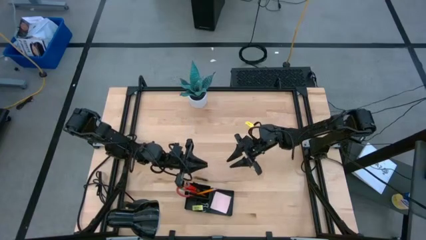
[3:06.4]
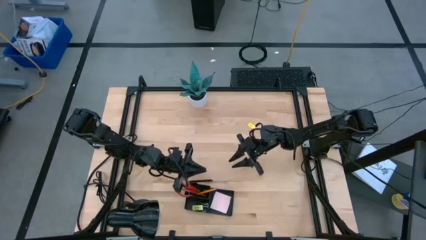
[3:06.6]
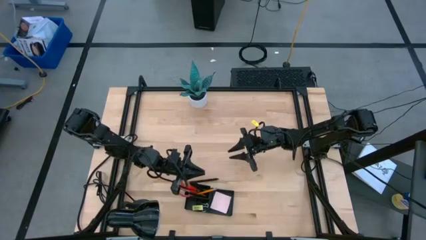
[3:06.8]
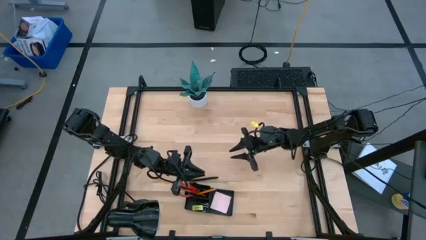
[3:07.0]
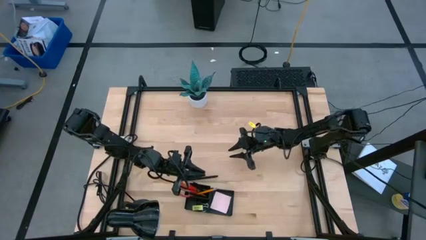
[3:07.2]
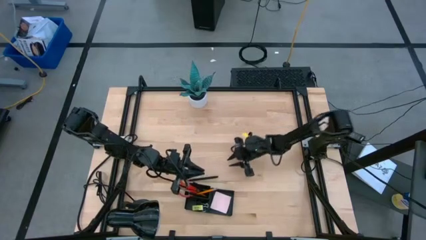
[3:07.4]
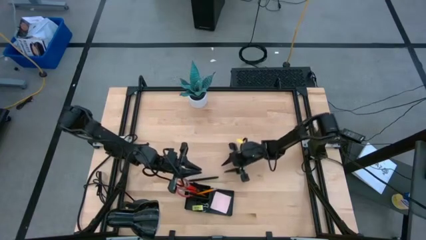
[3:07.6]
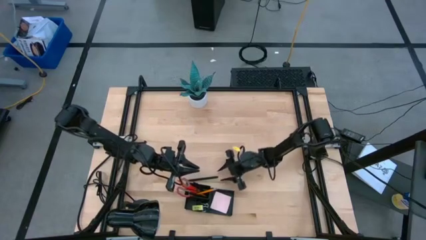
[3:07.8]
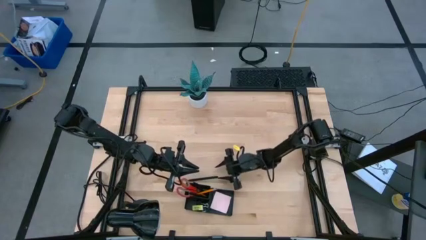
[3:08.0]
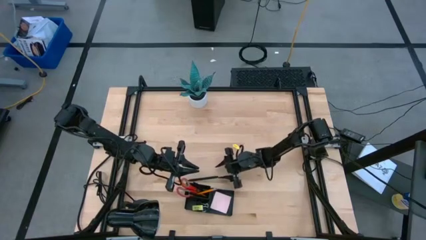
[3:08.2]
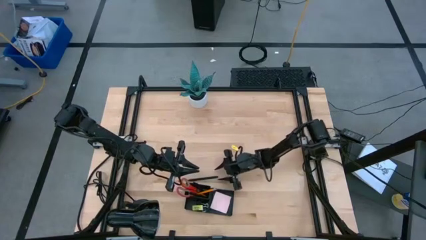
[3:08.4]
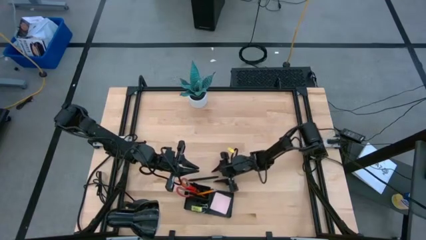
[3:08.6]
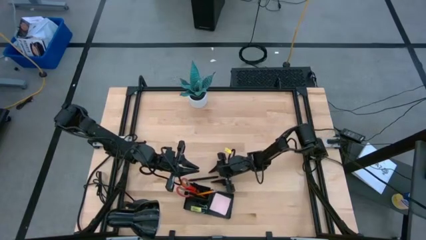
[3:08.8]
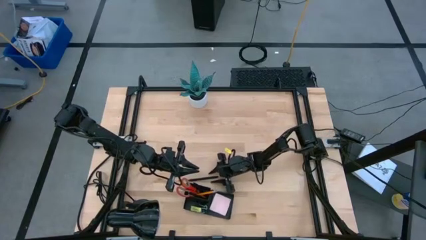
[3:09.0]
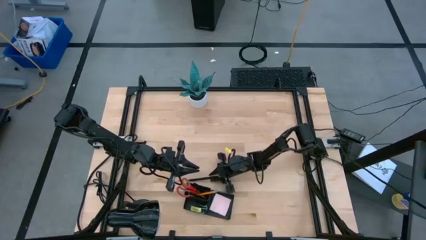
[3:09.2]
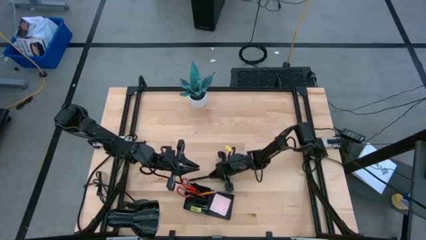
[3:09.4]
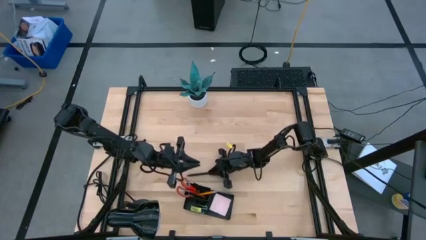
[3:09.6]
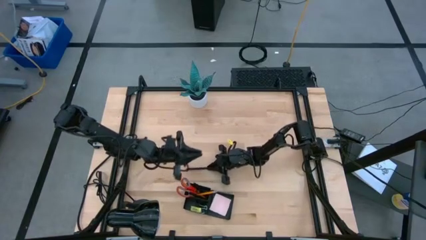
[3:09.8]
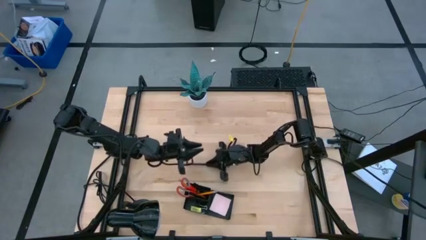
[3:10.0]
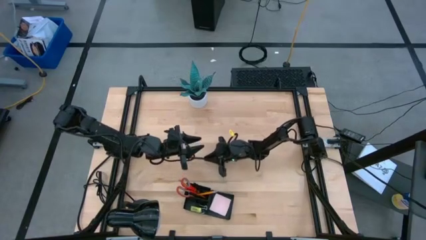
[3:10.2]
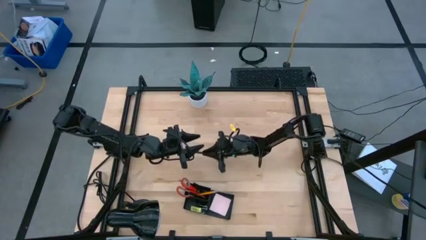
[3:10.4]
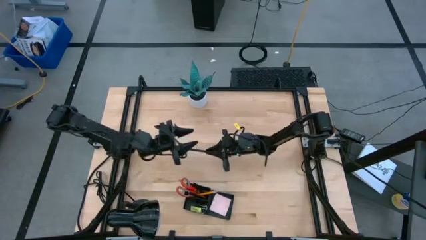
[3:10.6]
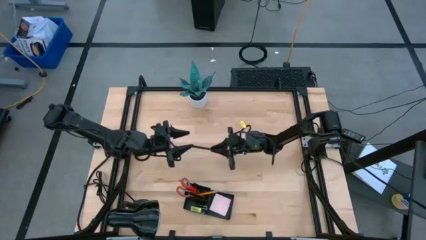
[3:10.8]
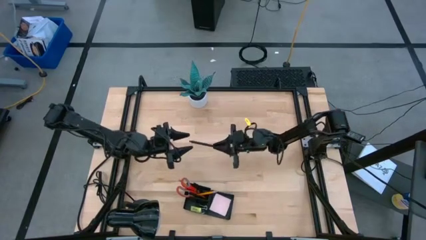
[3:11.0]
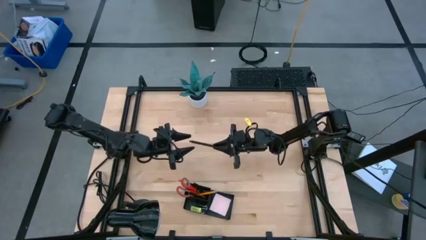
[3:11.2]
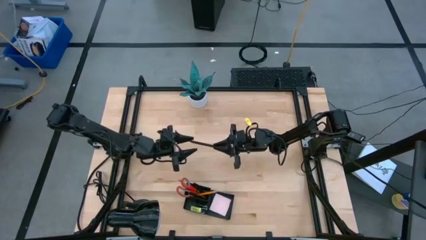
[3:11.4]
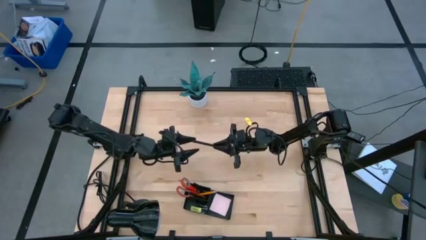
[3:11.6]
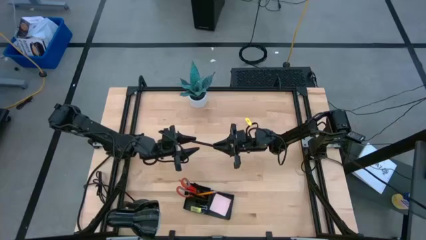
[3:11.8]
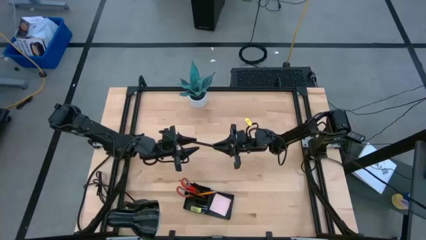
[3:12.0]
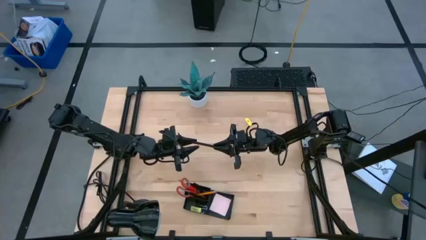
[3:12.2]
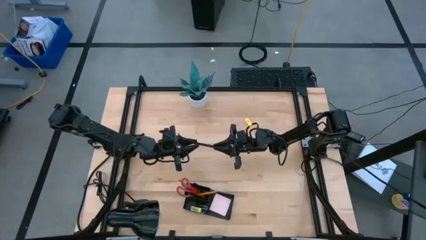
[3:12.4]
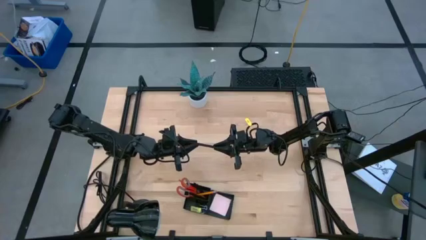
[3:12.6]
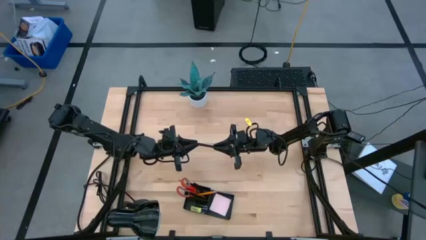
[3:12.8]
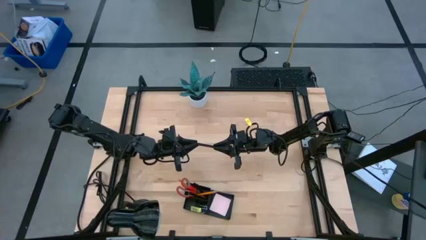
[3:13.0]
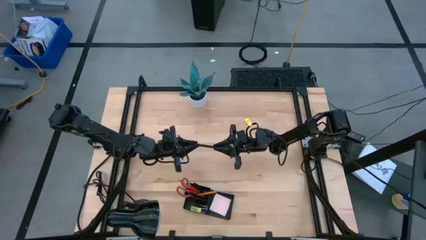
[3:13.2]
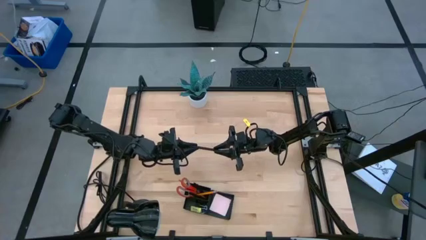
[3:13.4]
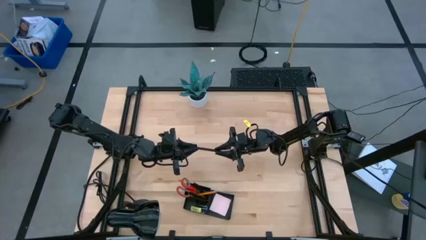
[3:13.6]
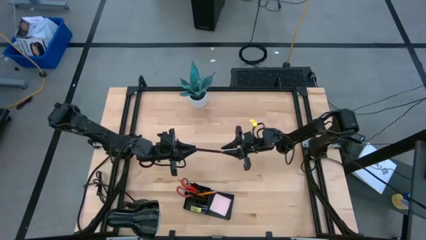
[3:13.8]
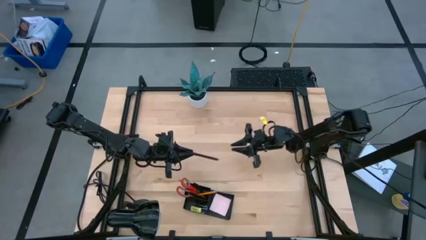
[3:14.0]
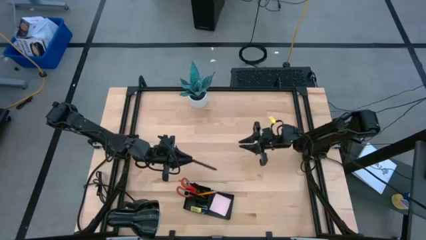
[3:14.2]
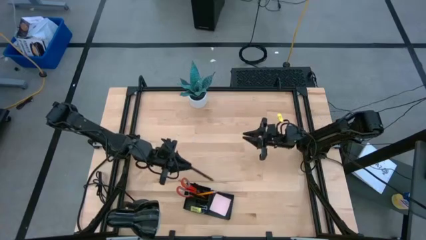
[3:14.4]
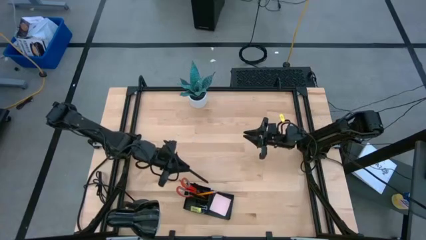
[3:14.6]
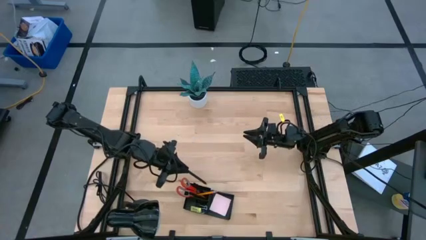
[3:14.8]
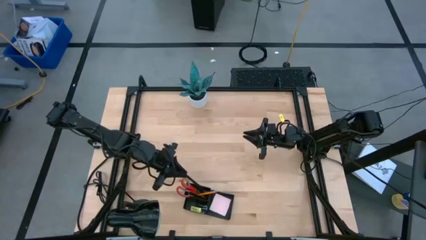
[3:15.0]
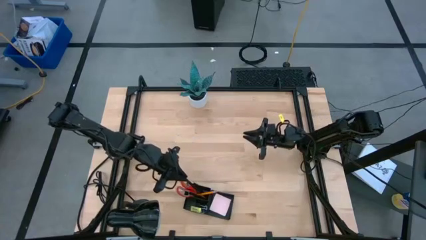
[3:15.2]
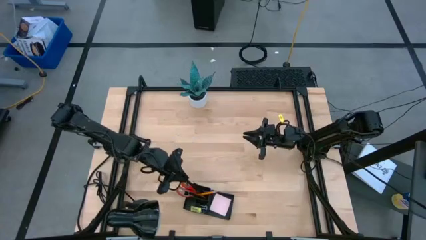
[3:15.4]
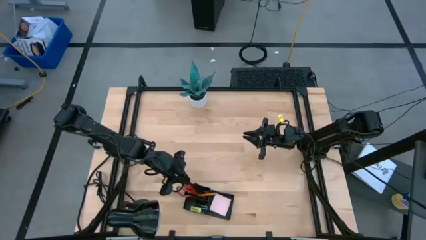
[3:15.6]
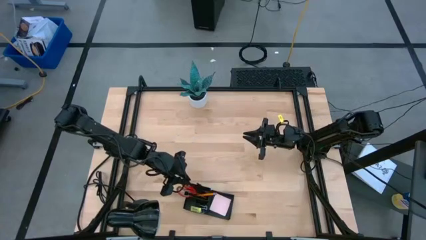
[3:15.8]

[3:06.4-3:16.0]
Task: Pick and place office supplies into organizer
Put the black pen into the black desk organizer

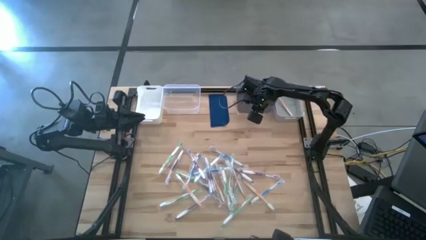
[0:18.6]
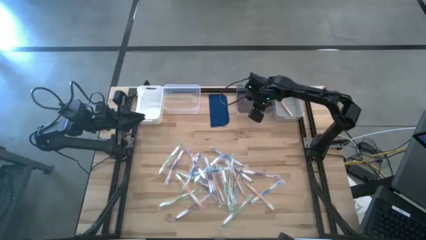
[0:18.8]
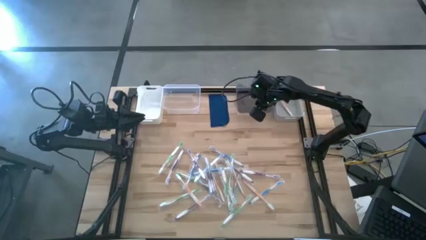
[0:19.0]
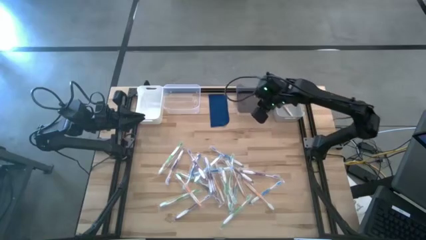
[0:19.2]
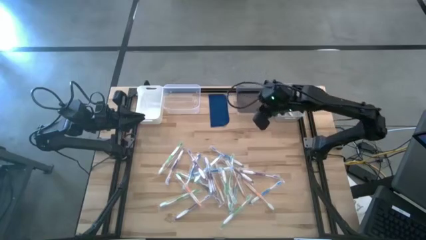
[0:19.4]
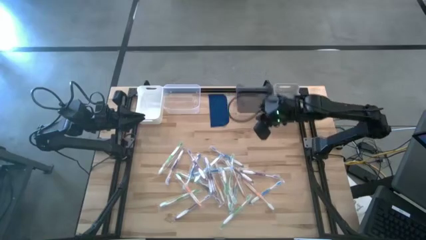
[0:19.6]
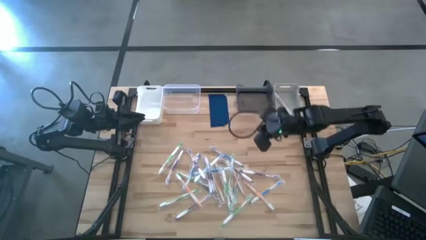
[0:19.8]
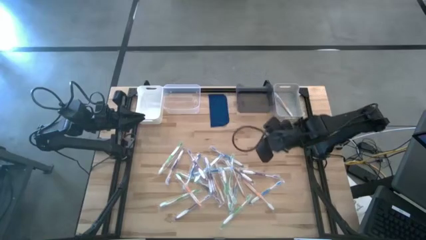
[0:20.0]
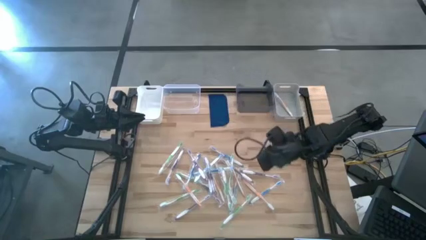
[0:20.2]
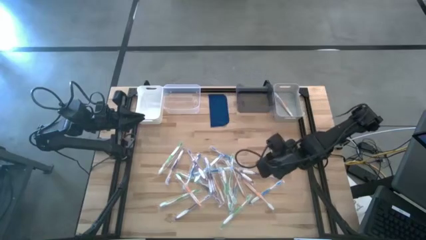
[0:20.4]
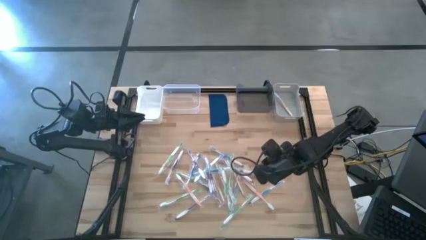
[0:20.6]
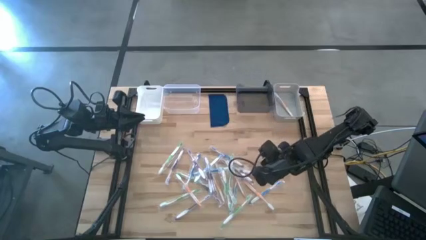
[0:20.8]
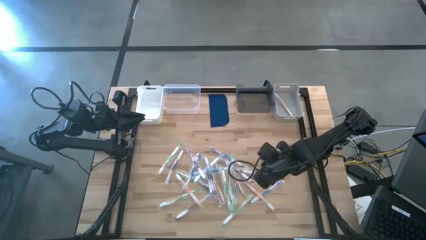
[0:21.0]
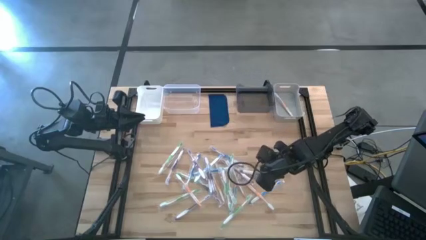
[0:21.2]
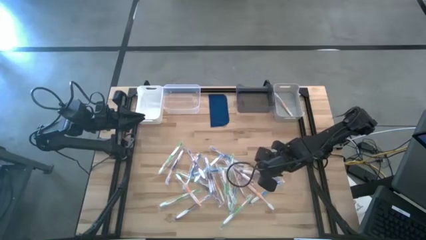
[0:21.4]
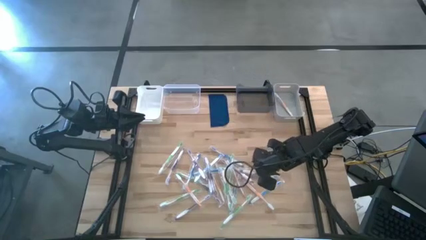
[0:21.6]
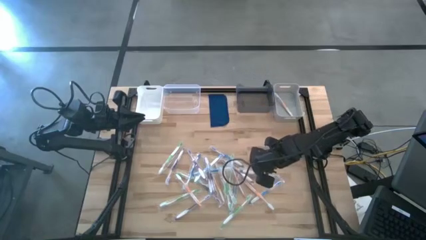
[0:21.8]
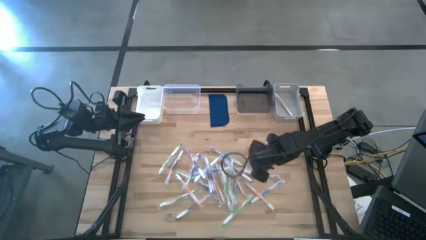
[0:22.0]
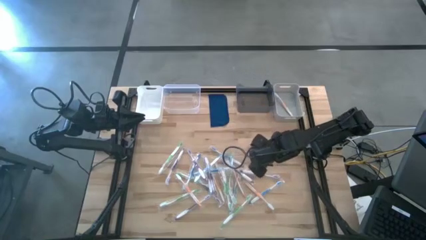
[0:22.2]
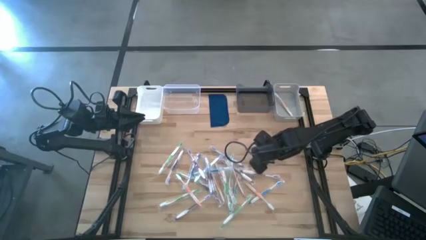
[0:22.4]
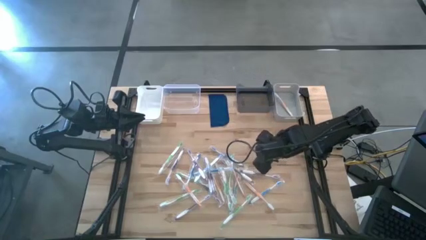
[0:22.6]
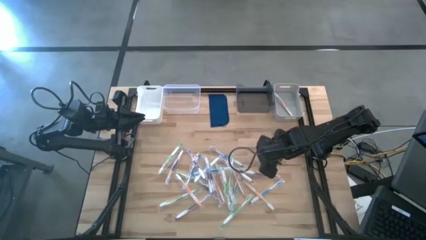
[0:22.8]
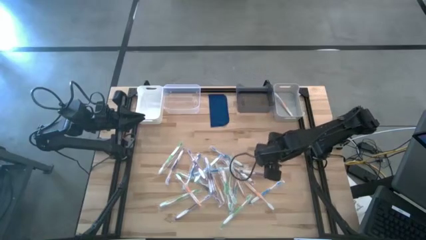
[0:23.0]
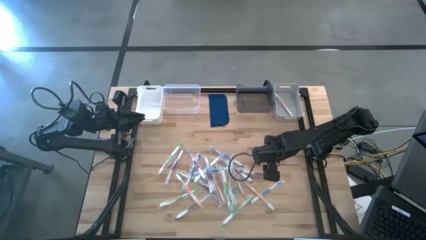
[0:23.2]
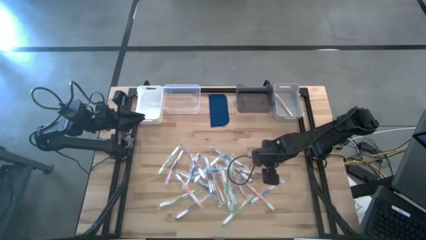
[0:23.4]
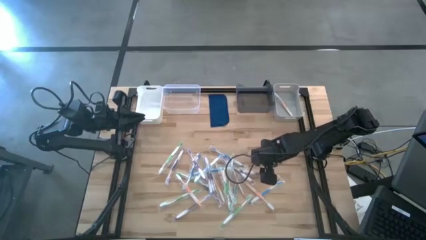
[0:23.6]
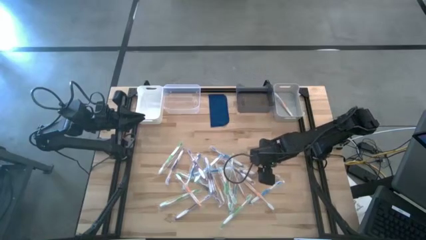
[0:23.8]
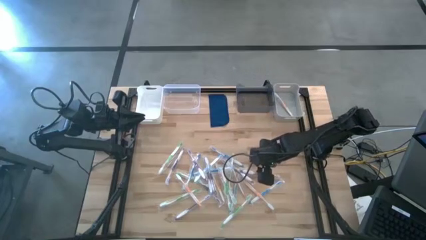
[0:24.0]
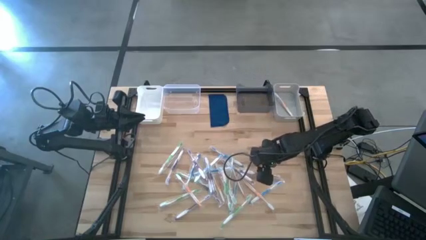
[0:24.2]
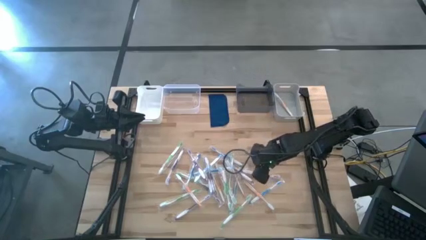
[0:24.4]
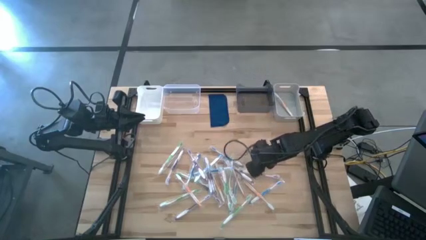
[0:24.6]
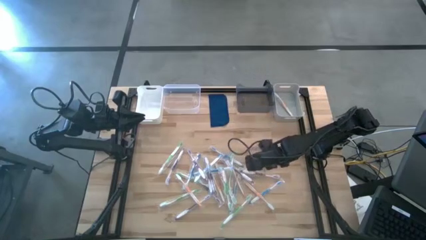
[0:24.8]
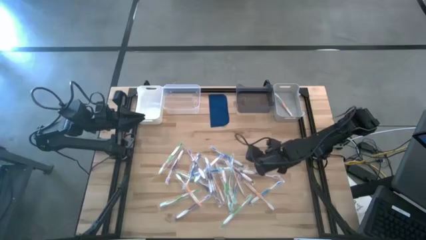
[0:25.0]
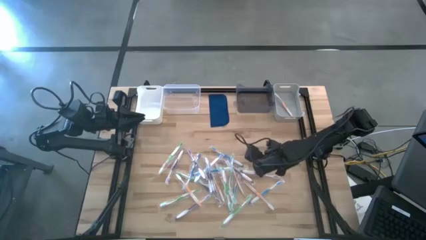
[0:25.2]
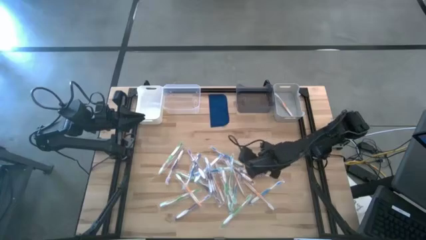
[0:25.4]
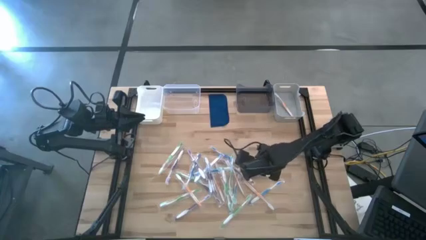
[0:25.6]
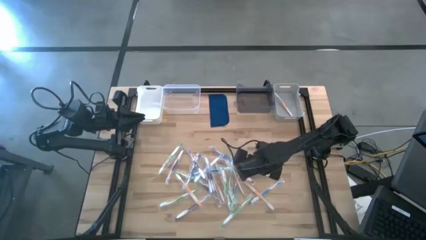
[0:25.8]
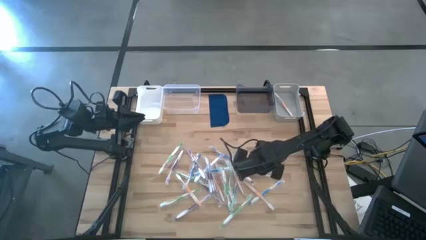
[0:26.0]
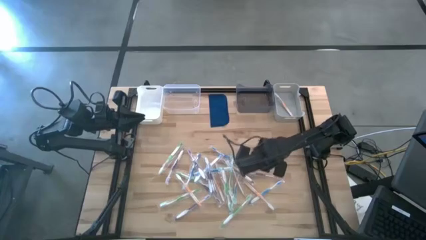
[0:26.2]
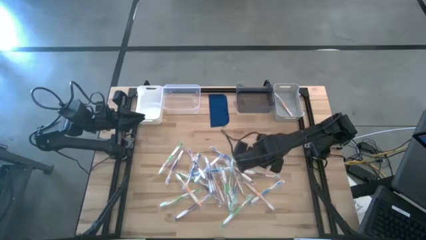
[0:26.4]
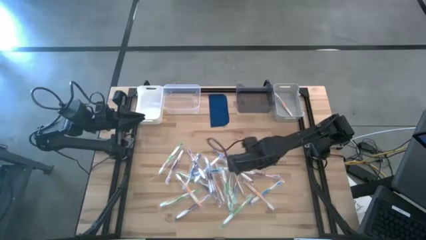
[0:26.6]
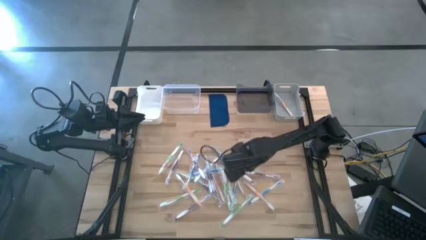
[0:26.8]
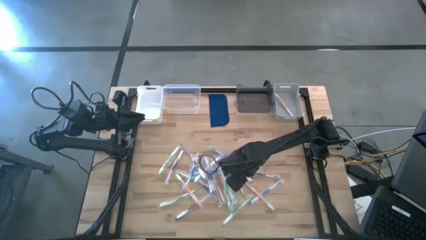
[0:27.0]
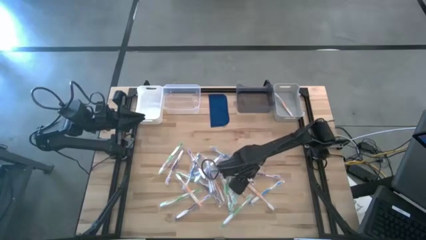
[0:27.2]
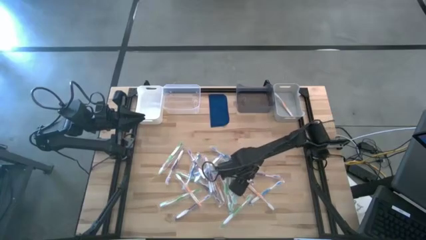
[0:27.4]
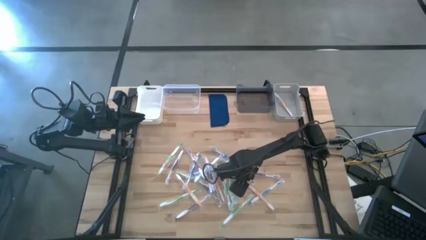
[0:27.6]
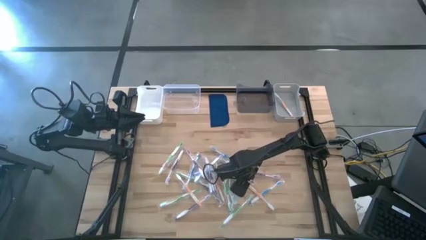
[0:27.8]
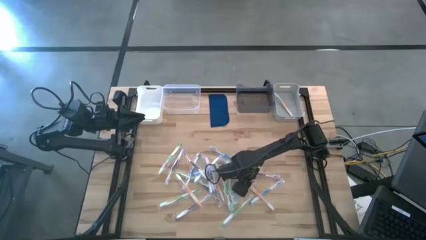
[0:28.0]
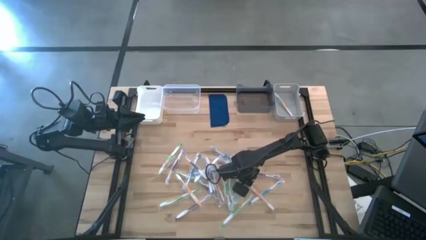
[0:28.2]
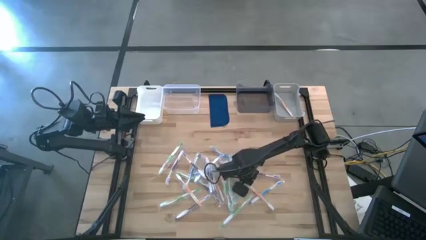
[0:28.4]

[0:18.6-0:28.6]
Task: Pick & Place Toothbrushes
Put the purple toothbrush into the black bin
